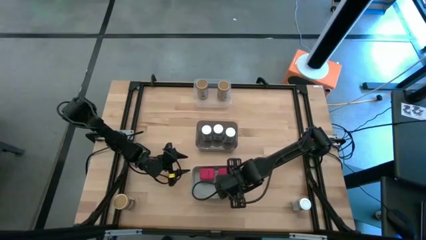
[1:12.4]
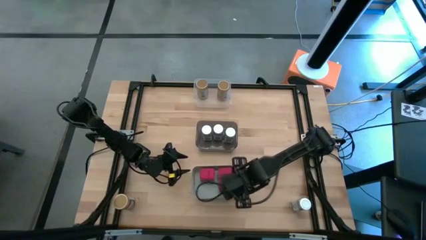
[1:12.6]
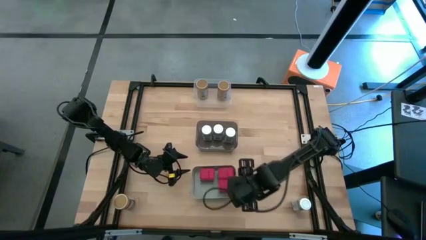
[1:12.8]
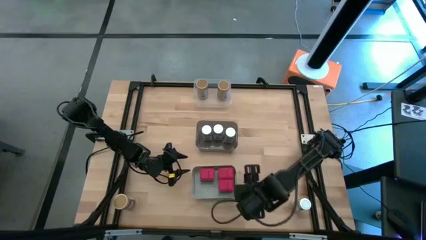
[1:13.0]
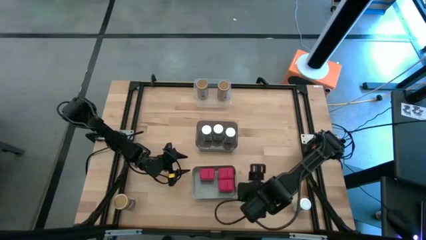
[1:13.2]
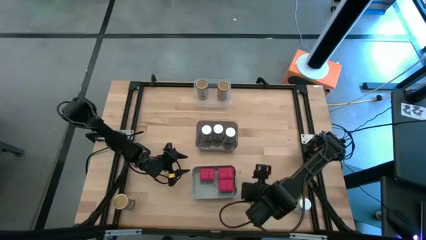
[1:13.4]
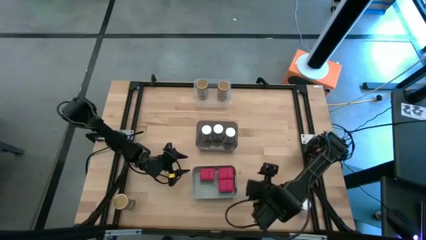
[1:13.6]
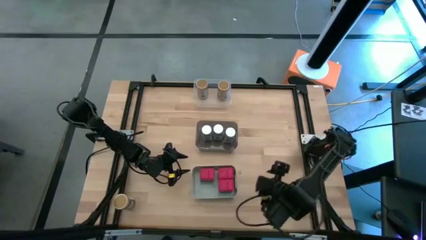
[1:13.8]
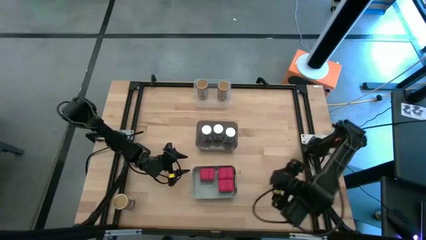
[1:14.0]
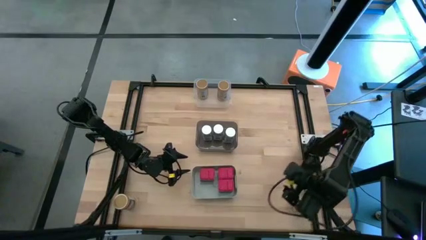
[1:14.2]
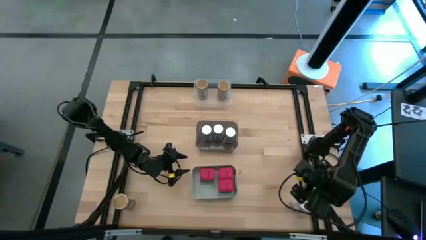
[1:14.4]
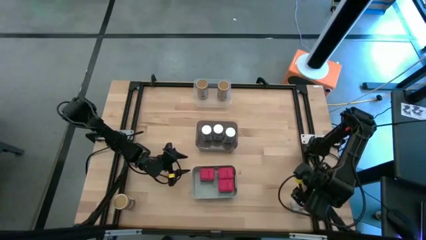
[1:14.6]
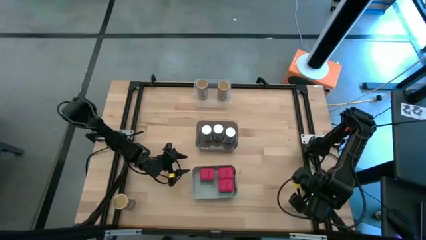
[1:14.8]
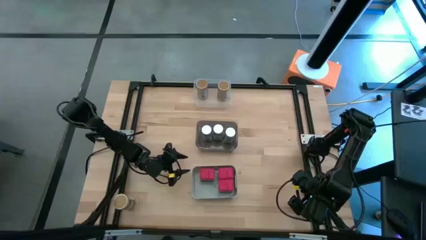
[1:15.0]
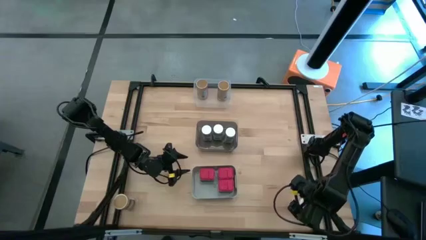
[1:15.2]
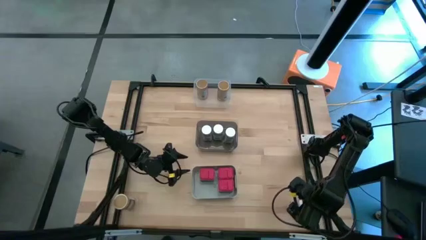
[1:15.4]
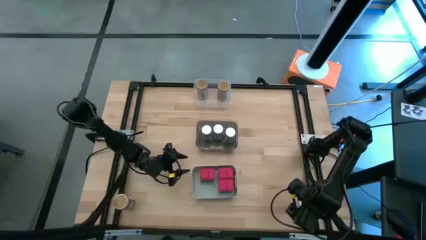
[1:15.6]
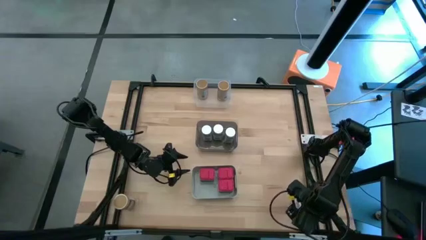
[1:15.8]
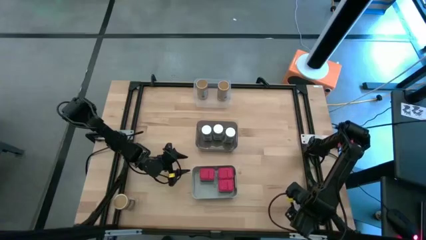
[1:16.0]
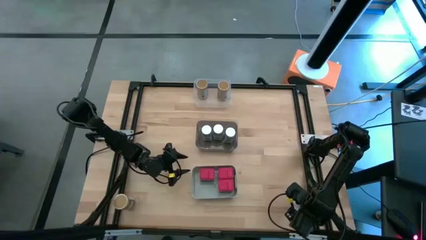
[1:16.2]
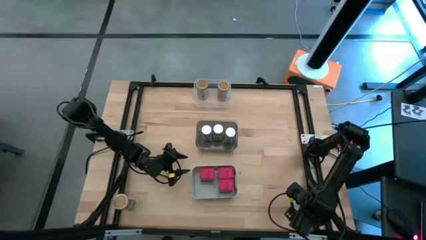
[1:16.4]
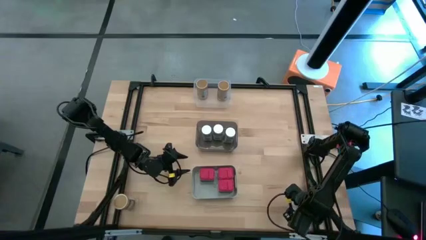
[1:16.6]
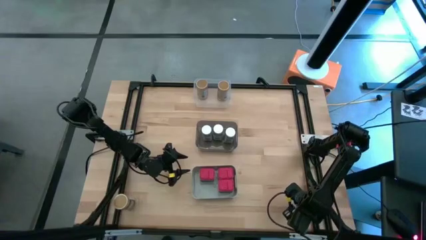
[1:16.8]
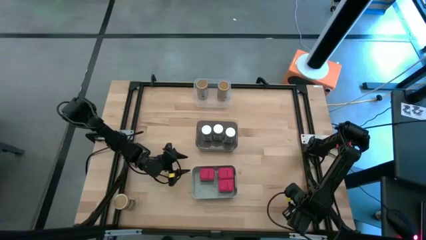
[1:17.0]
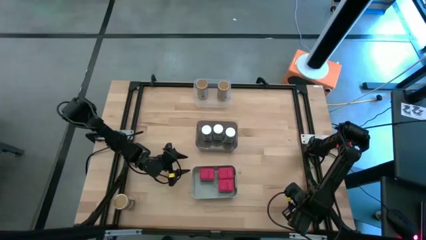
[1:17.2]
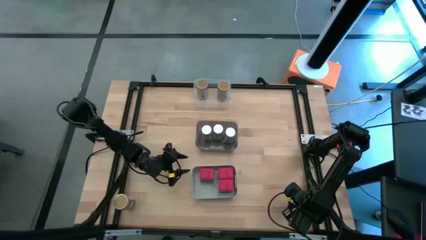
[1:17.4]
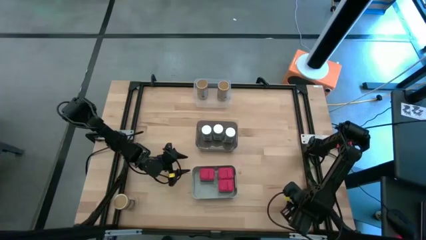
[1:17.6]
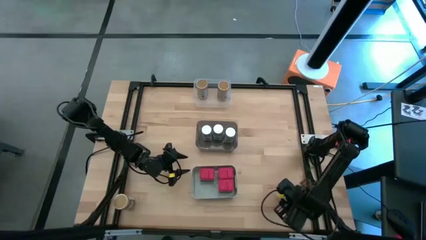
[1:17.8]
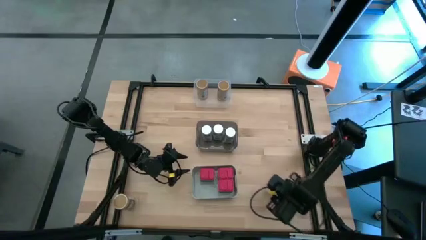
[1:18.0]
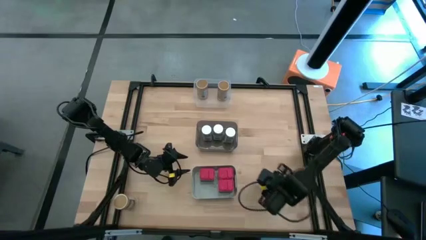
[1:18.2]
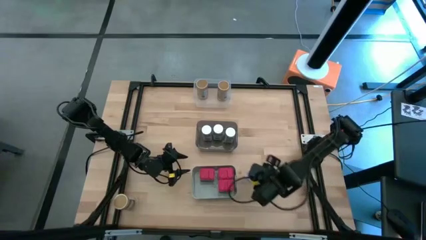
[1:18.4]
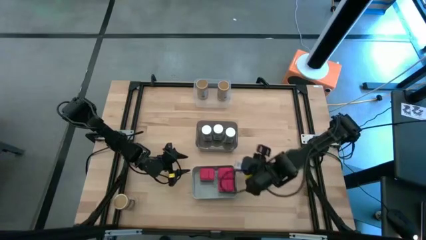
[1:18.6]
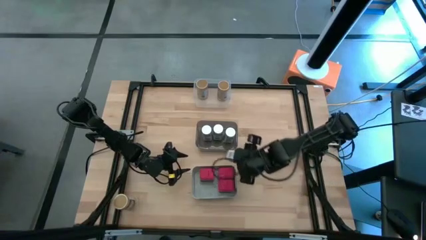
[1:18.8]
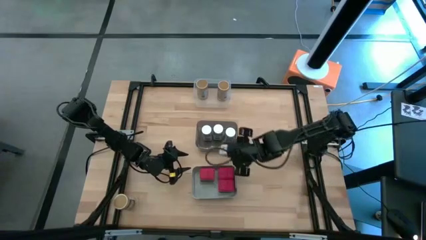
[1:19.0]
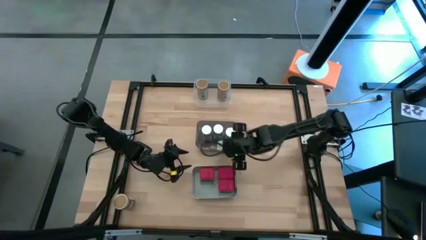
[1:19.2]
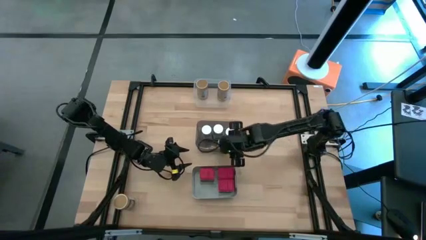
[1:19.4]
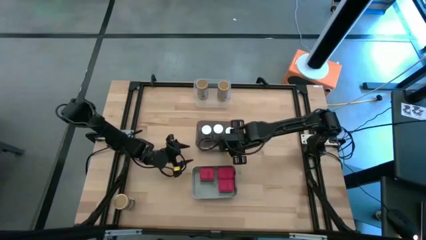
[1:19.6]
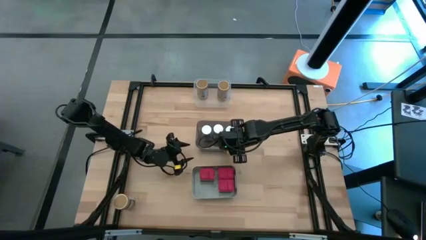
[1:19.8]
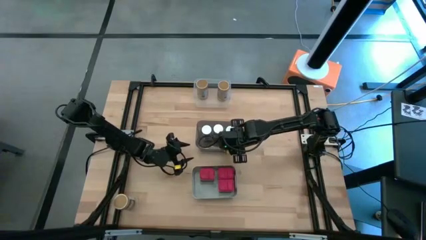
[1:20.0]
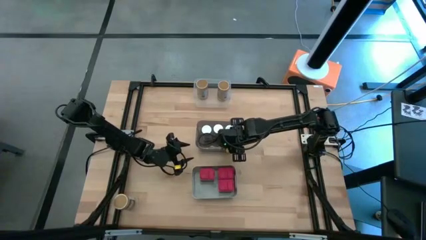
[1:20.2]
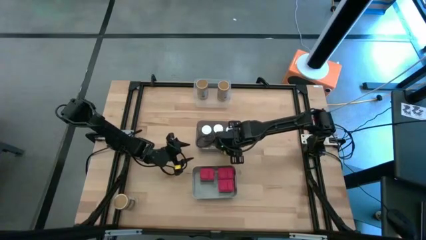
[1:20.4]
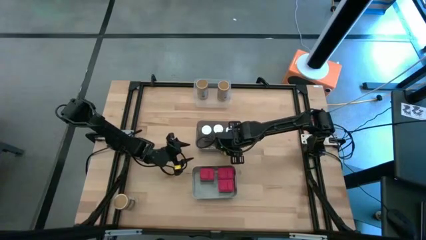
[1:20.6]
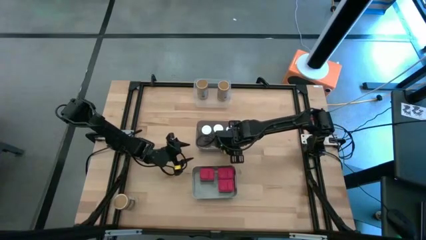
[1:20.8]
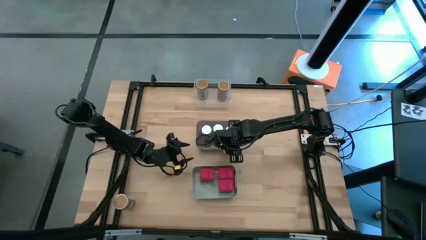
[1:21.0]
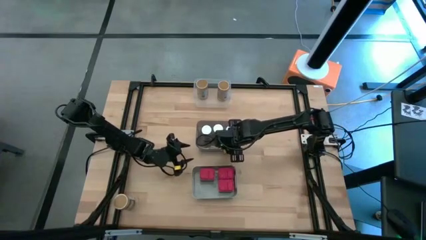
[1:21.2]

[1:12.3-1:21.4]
Task: Sort spices by type
Put the bottom white seasoning bottle into the black bin

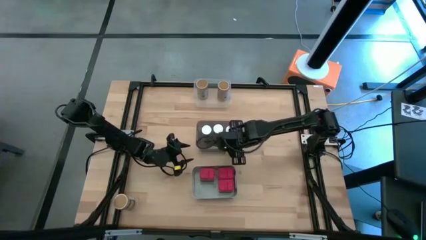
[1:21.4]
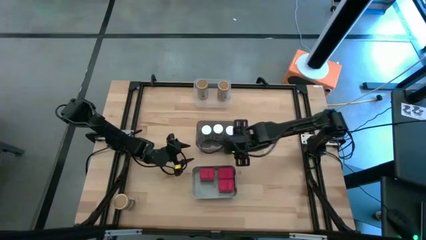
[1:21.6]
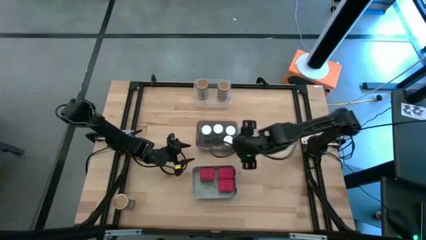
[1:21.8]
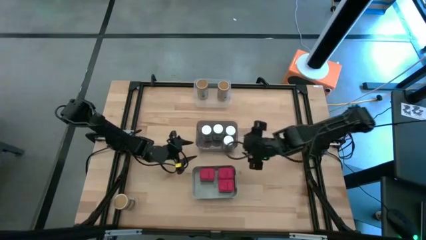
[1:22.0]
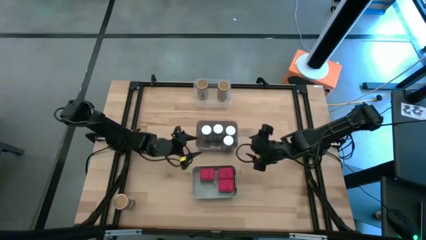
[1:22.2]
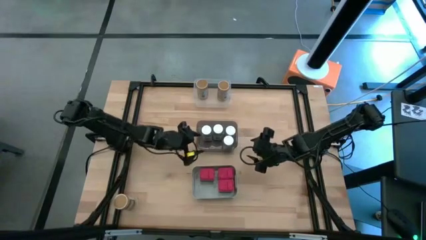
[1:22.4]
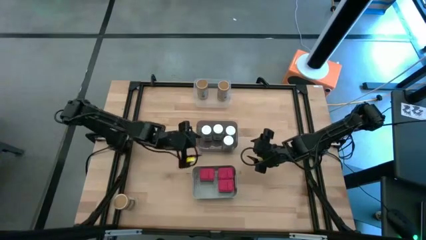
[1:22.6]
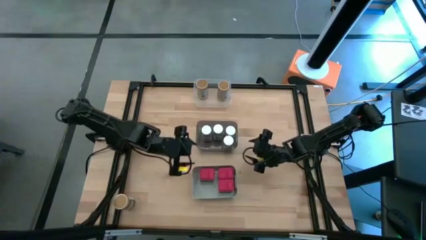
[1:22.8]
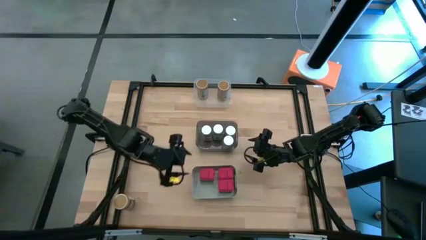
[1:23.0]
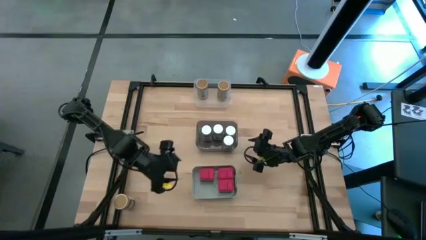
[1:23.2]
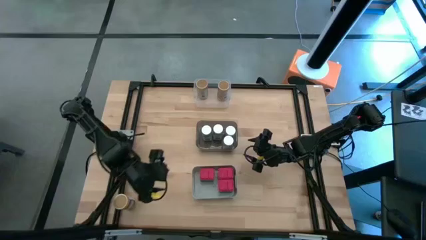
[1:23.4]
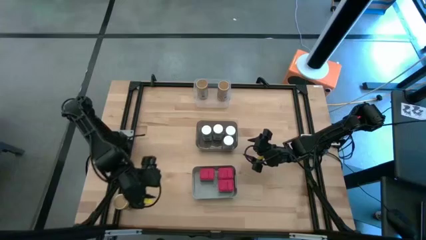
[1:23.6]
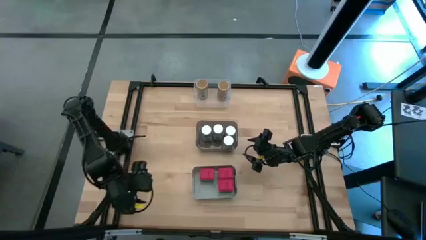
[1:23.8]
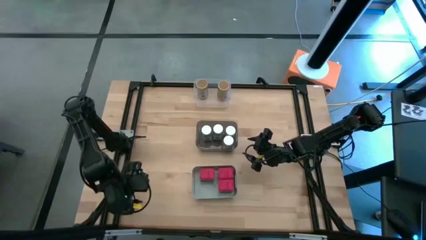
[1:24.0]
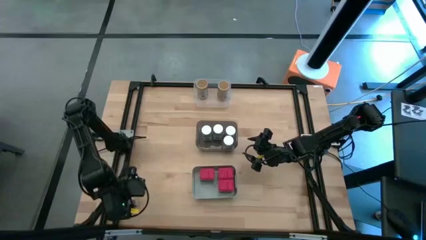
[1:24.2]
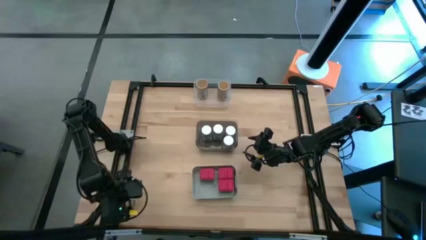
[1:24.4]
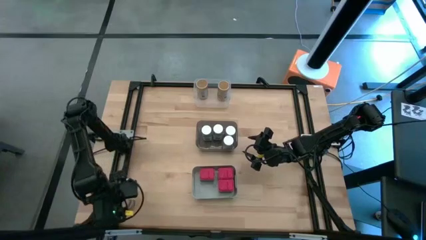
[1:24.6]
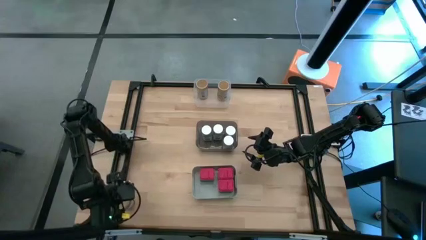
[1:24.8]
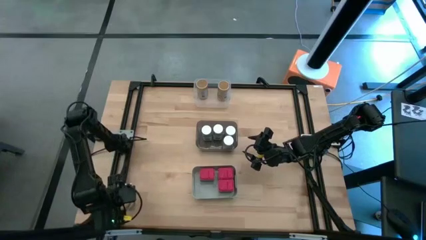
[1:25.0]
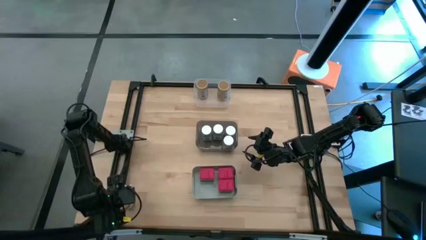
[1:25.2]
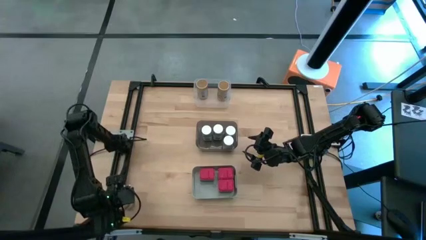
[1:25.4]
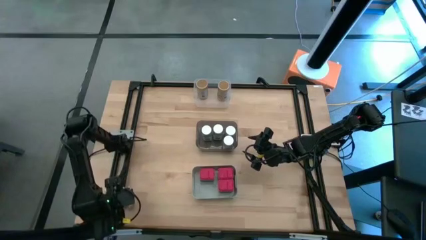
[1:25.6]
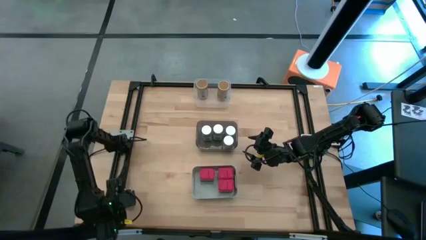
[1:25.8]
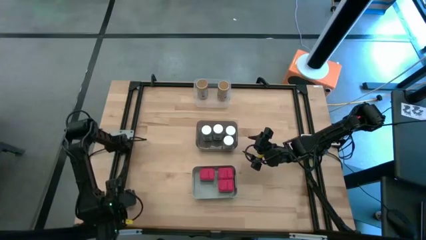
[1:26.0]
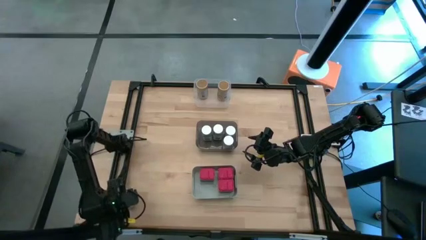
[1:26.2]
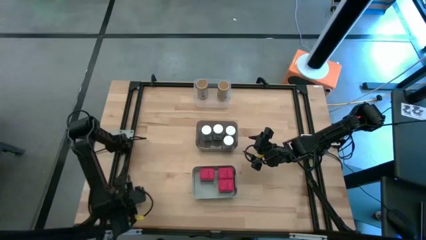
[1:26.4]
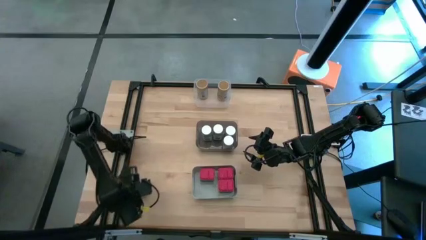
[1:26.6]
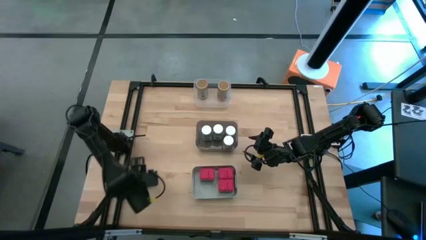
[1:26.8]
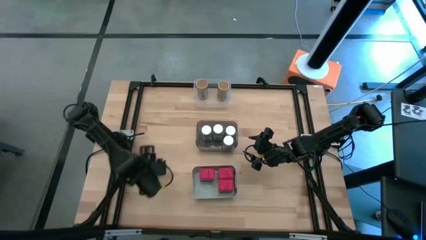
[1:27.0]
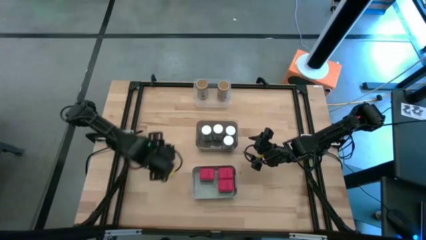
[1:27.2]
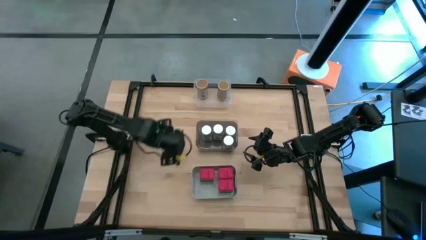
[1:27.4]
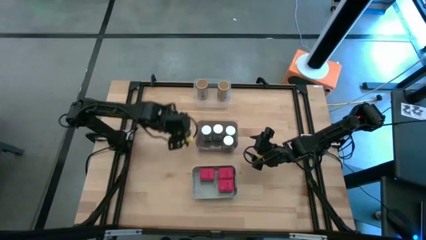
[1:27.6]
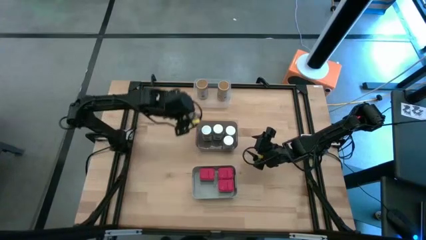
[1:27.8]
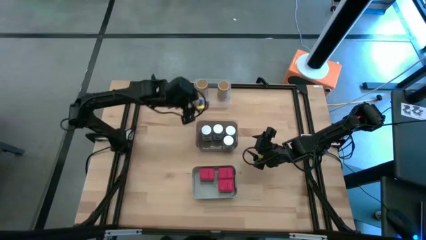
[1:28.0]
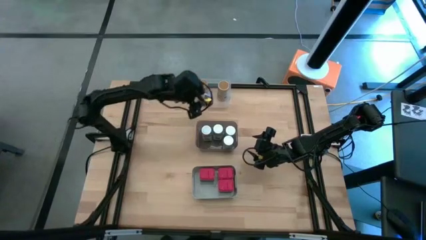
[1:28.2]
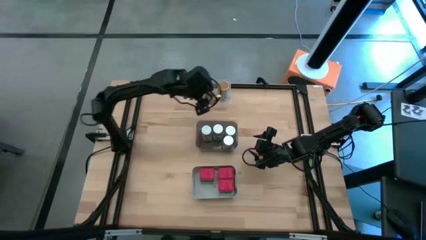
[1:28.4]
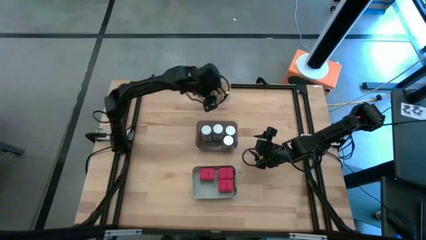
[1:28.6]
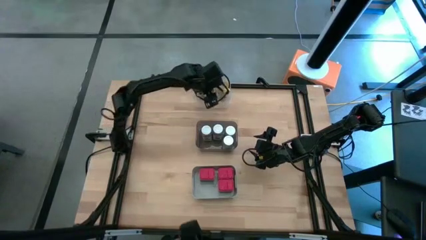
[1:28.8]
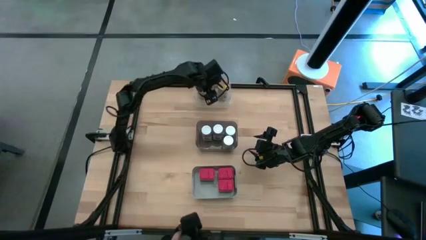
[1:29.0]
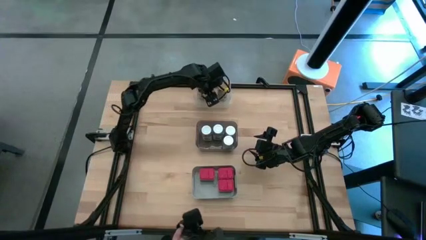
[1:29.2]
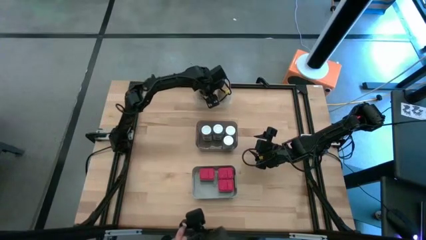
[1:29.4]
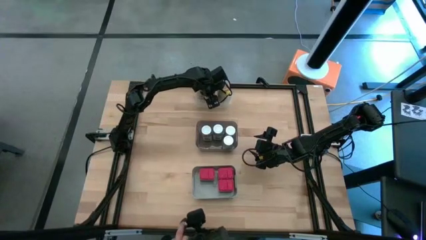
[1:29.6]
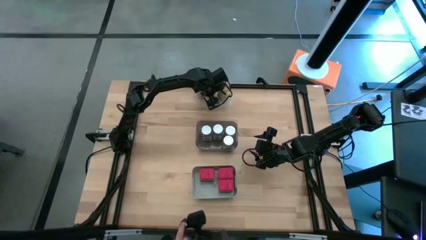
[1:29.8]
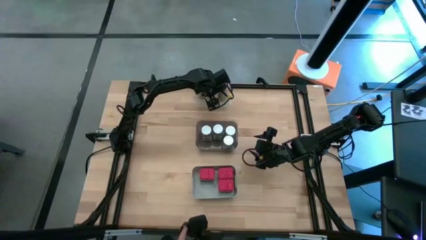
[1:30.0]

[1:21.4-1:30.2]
Put the bottom gold seasoning bottle into the transparent bin
